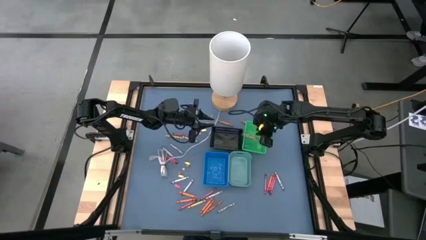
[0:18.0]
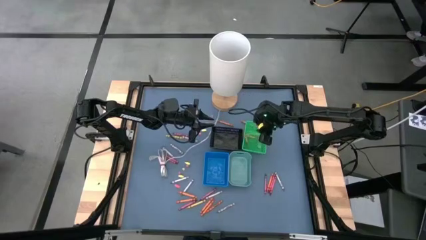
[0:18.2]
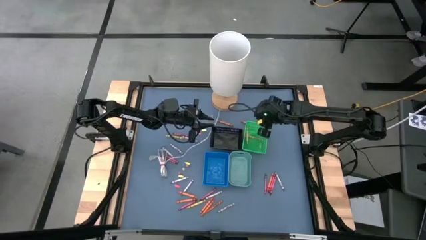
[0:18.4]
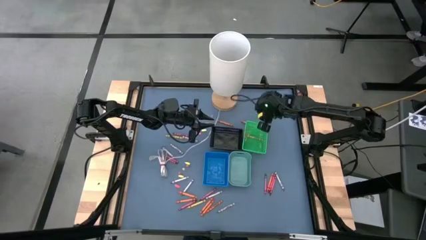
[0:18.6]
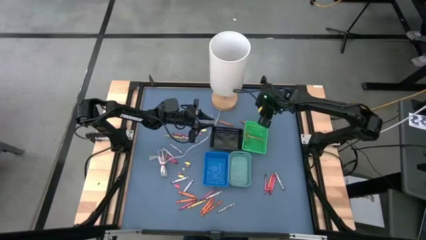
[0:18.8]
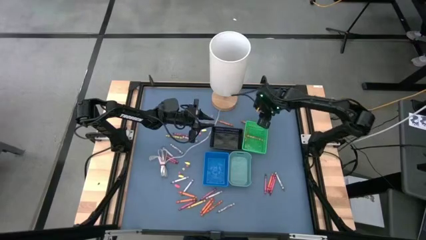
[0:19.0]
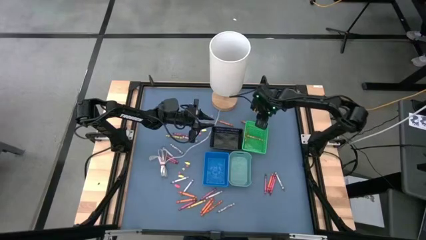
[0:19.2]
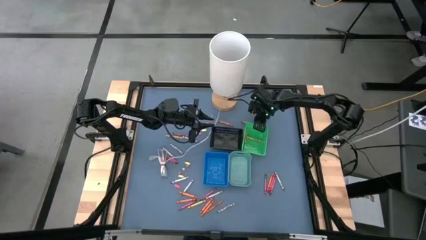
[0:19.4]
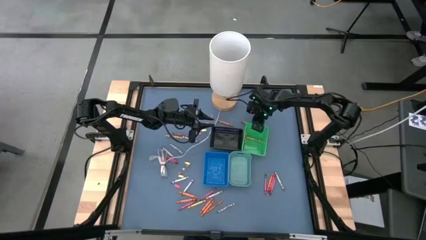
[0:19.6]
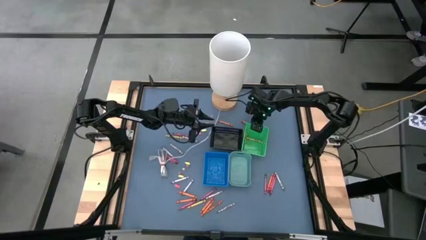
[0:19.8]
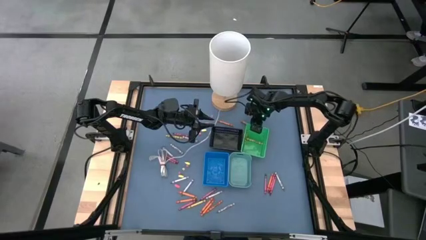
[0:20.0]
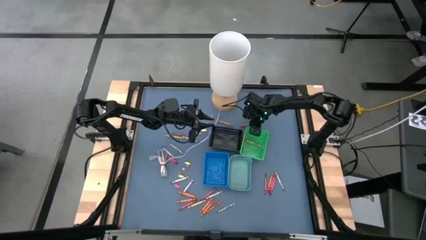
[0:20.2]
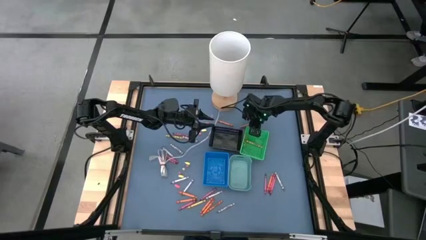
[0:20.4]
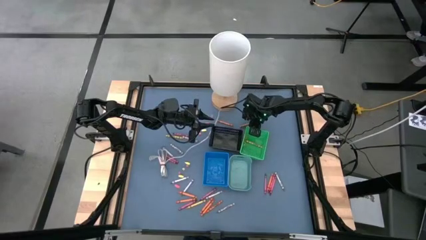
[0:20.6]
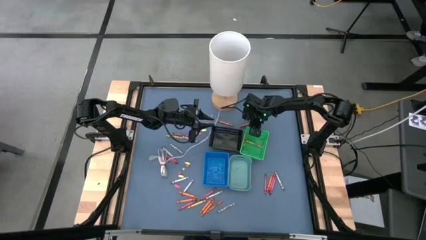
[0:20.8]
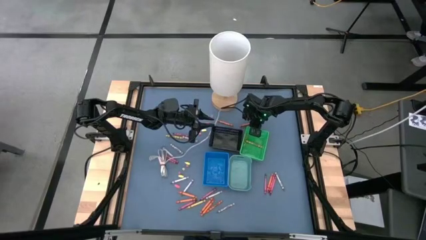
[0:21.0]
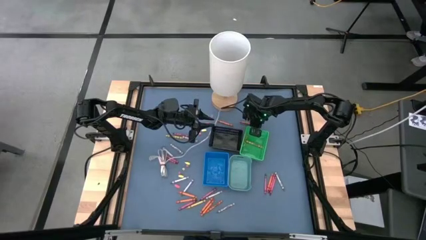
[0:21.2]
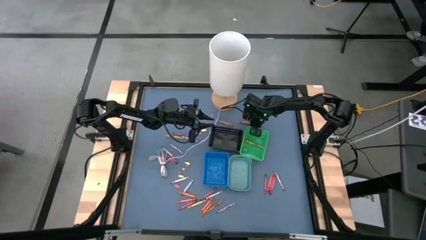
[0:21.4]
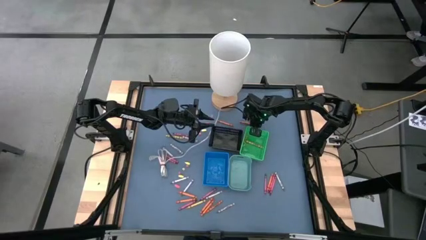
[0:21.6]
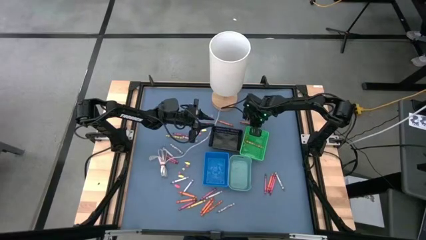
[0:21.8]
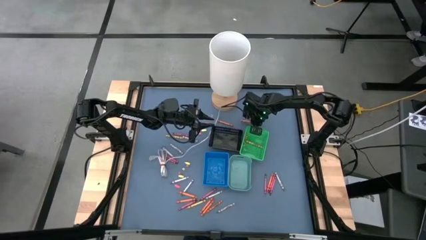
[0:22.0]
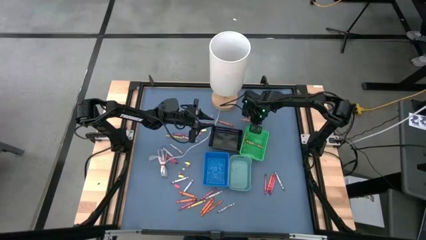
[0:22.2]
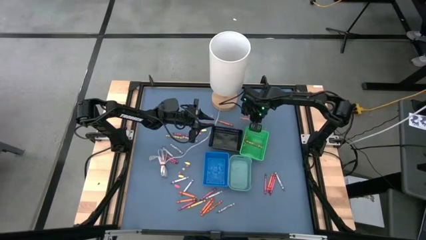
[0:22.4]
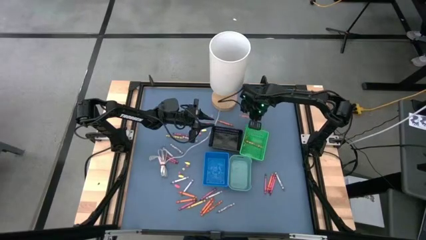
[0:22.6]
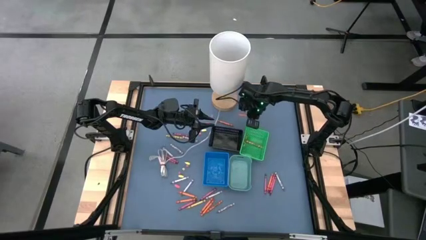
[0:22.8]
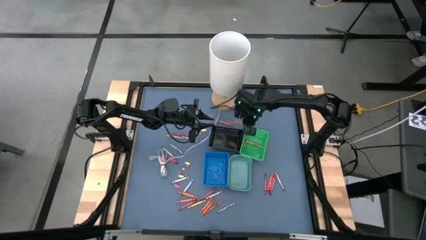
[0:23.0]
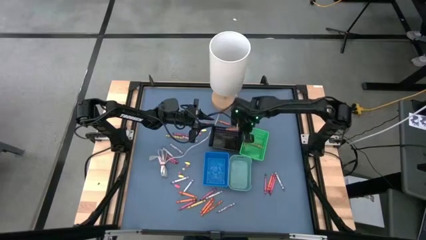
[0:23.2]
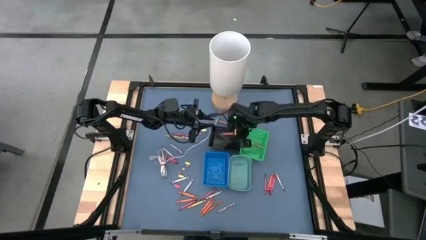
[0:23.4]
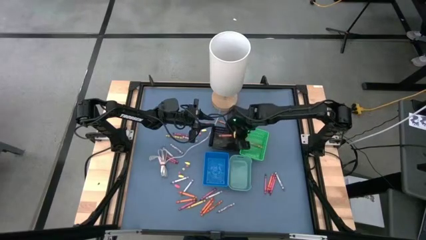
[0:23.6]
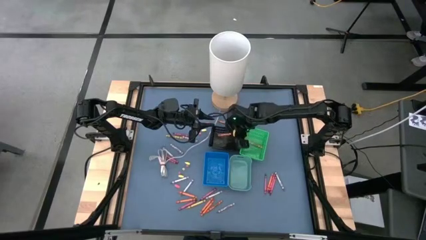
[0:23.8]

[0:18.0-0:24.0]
Task: Sort crayons
Put the orange crayon into the black bin

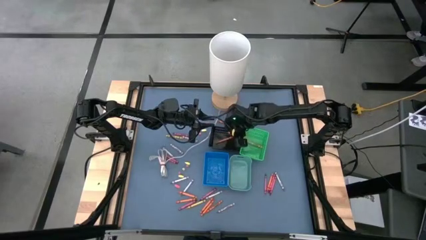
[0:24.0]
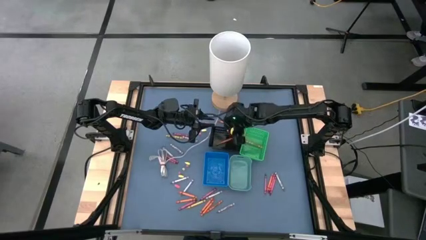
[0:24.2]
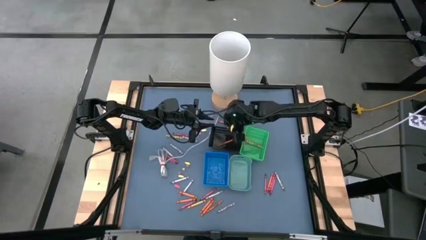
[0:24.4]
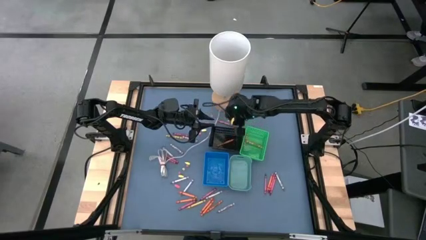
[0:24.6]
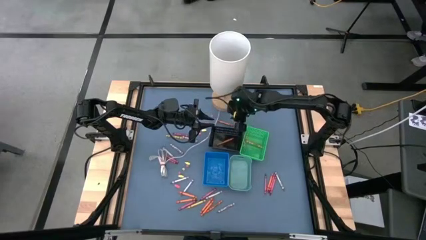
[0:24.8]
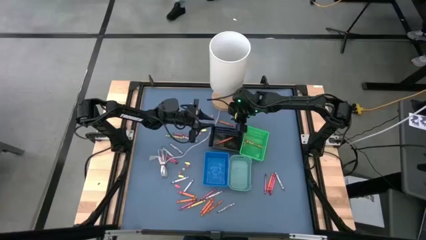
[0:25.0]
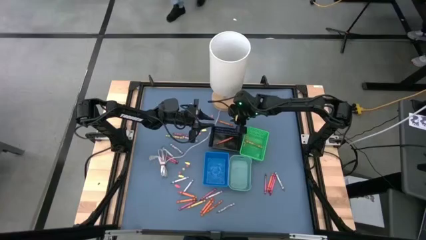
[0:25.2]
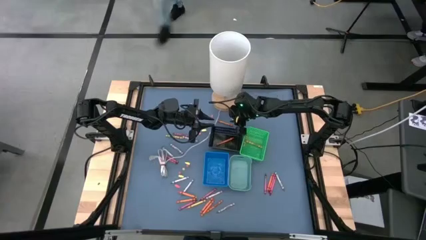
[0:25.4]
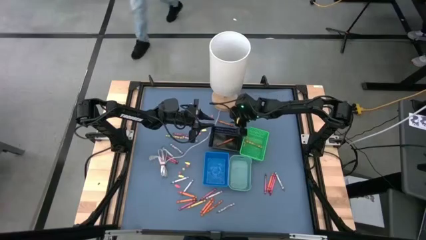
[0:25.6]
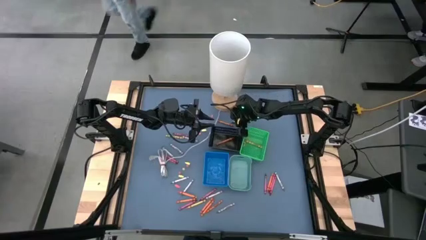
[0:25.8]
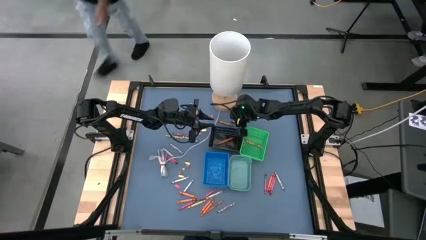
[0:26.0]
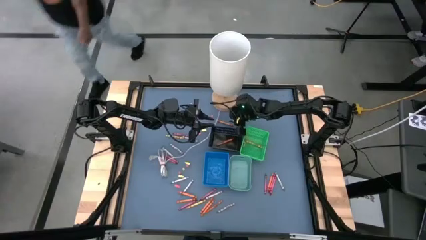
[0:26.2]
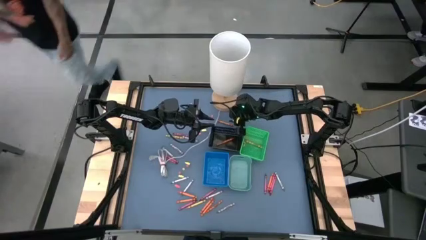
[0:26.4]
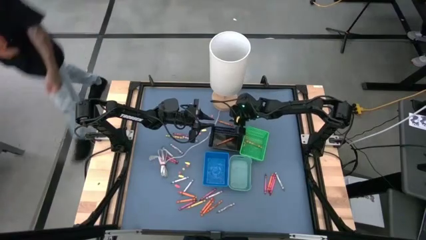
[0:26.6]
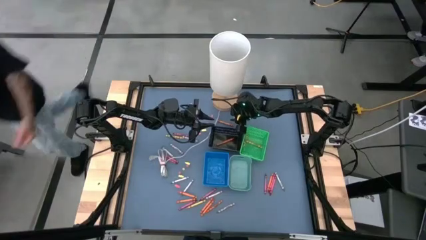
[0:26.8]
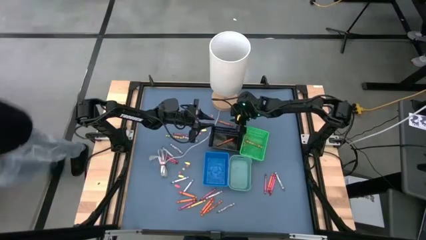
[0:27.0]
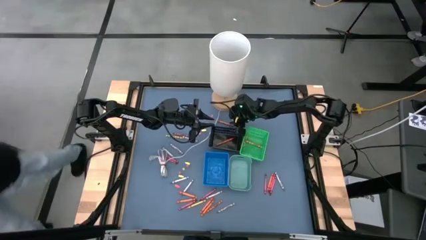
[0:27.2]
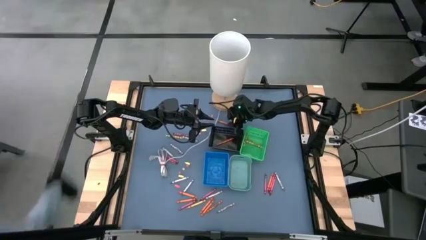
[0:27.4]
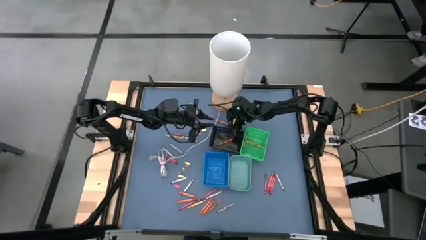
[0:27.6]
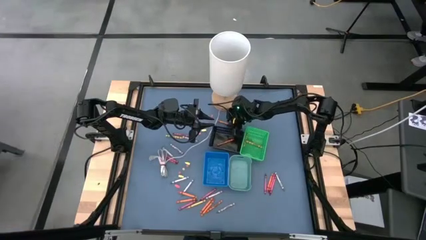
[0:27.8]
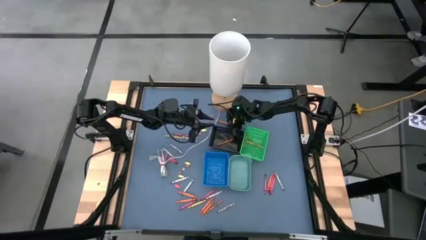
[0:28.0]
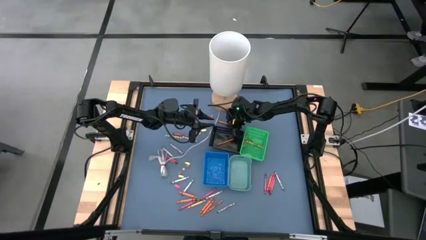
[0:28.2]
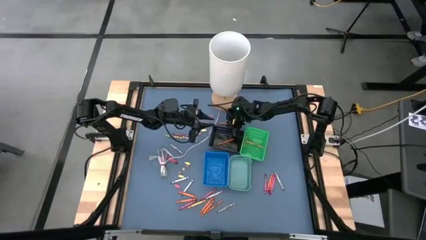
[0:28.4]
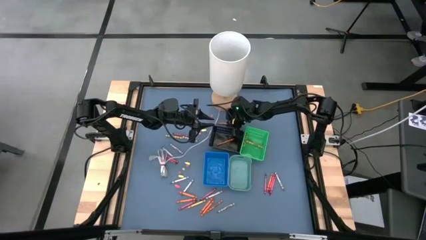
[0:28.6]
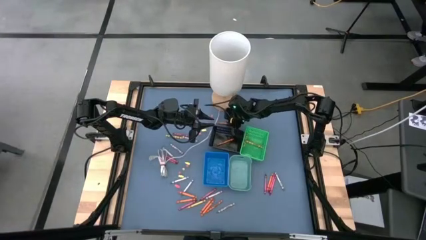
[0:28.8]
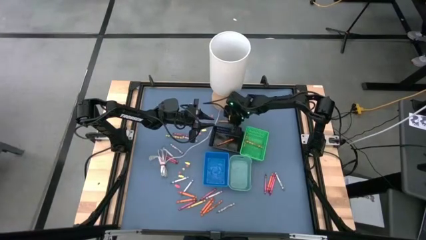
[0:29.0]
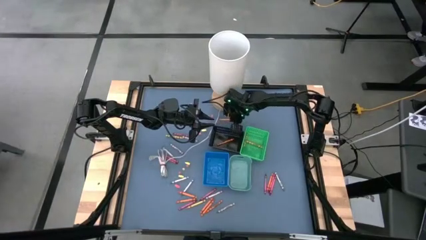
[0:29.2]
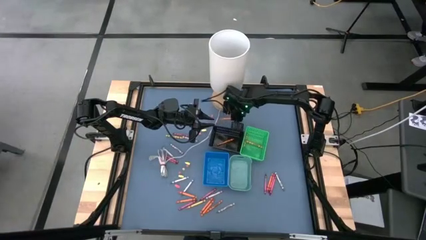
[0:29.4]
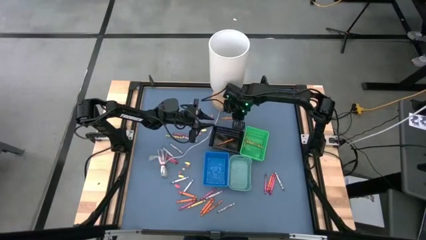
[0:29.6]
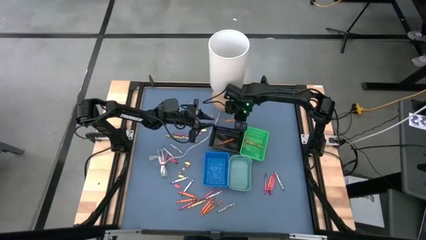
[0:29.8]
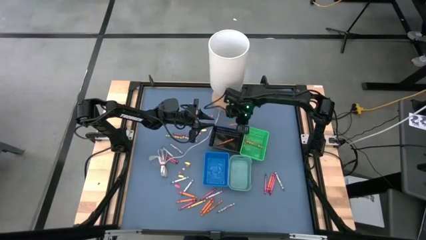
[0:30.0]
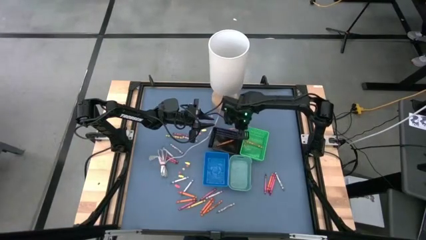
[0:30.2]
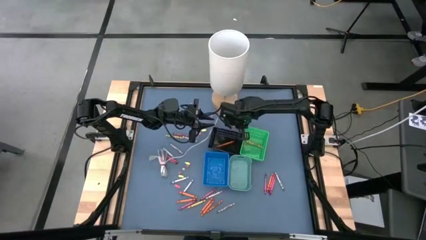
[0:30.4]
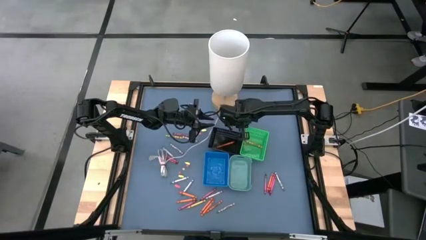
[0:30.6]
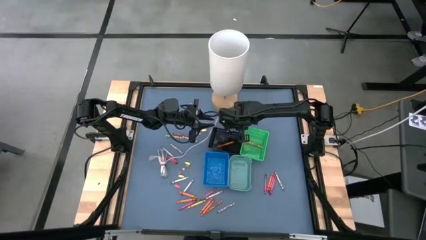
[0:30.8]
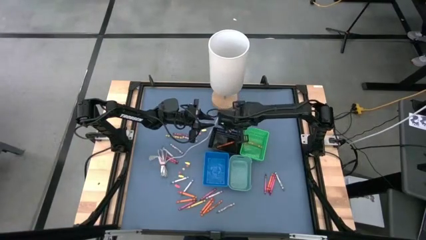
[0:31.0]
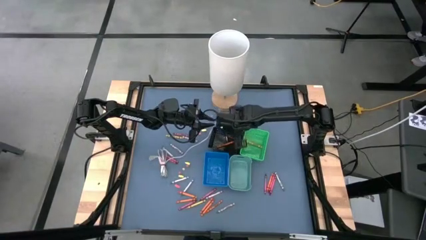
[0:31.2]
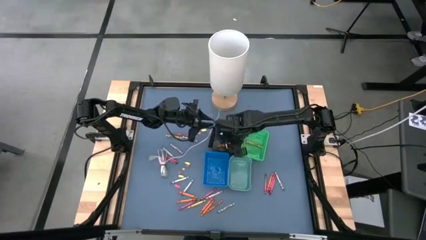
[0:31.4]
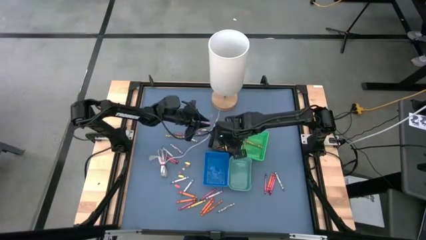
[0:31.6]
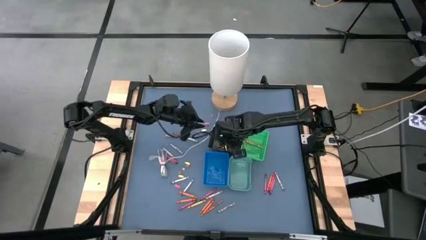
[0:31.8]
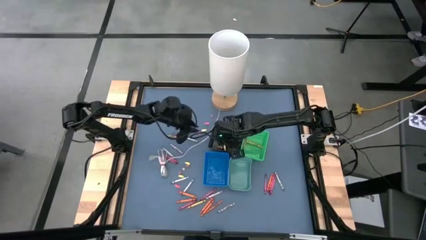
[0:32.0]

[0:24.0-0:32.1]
Put the orange crayon into the black bin

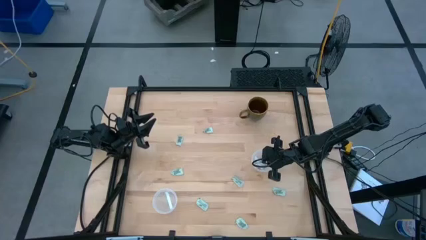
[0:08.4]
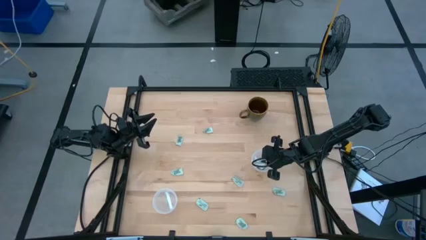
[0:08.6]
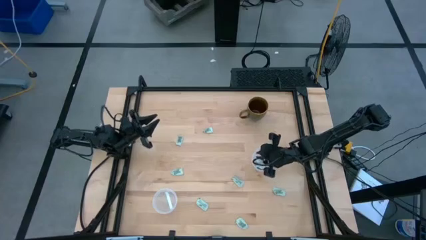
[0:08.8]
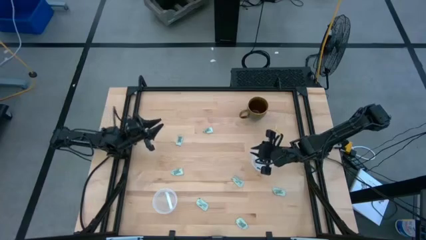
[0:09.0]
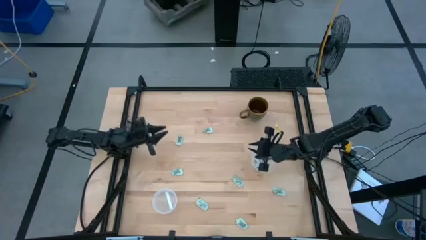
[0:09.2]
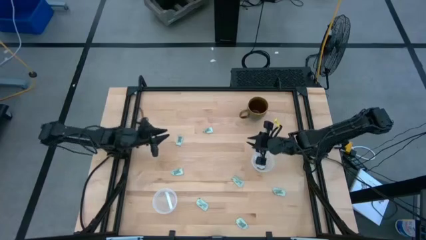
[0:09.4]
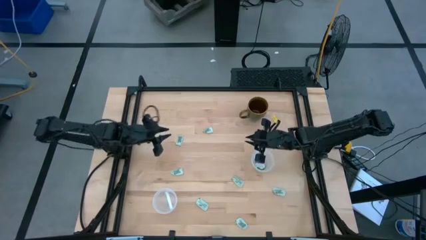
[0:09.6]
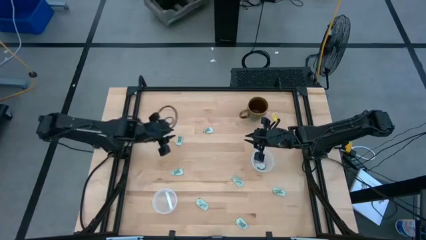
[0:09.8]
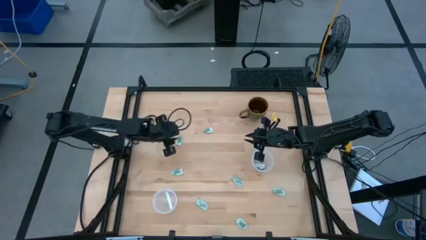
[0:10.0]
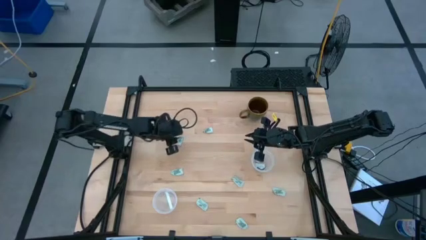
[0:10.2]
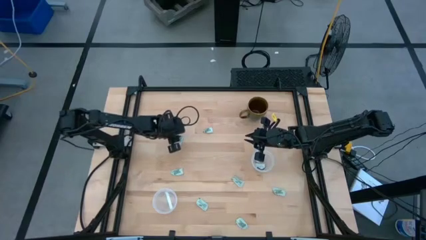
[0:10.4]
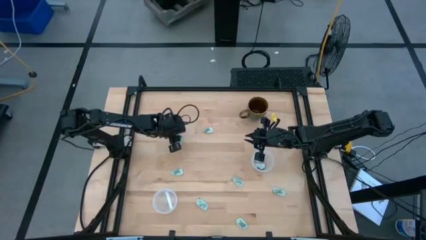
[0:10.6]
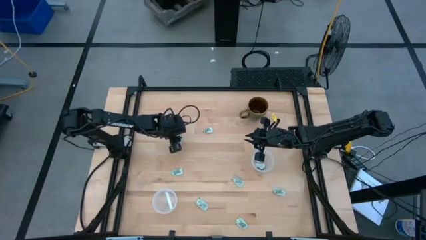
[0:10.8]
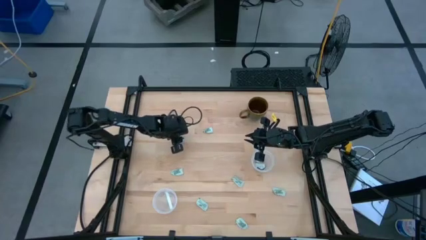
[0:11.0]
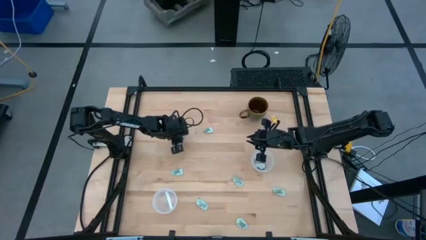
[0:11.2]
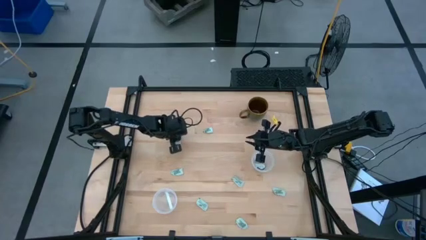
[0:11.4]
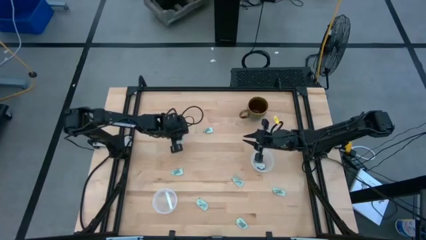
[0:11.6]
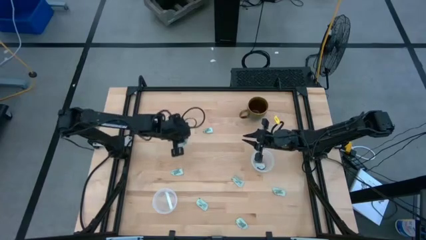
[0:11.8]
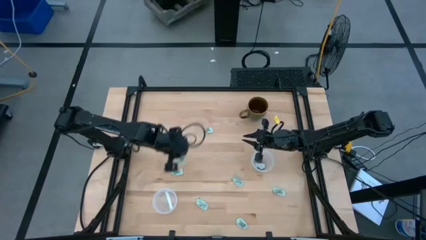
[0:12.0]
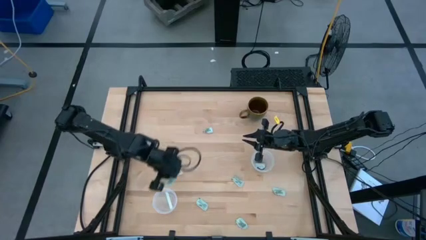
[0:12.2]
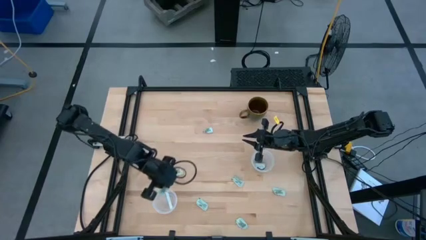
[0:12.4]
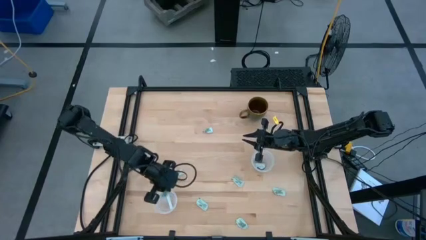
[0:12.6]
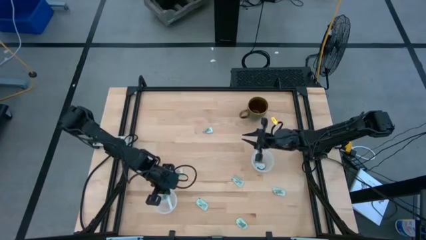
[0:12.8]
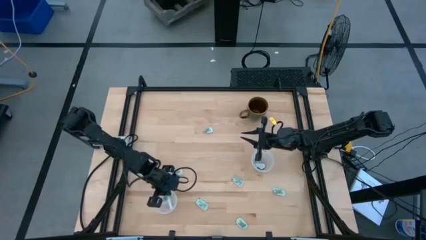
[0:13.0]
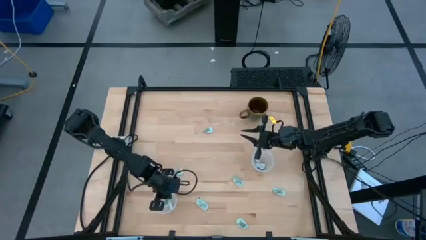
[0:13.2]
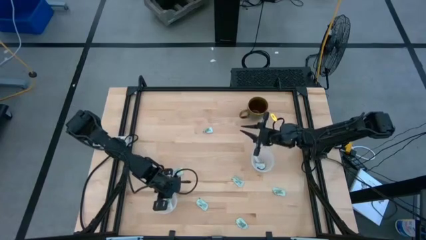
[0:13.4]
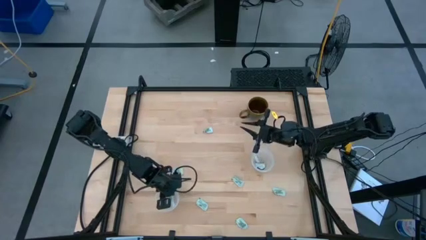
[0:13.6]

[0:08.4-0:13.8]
Task: Pick and place Stevia / Truvia into bins
Put the stevia packet into the bottom transparent container
